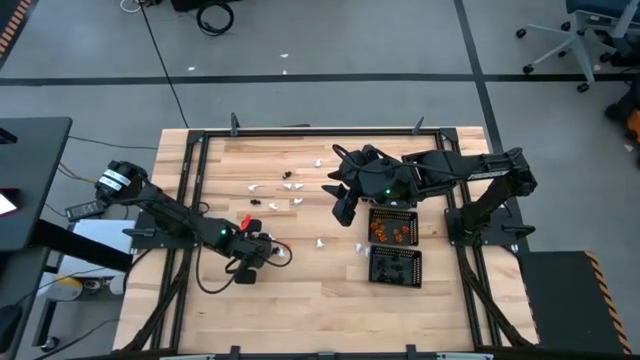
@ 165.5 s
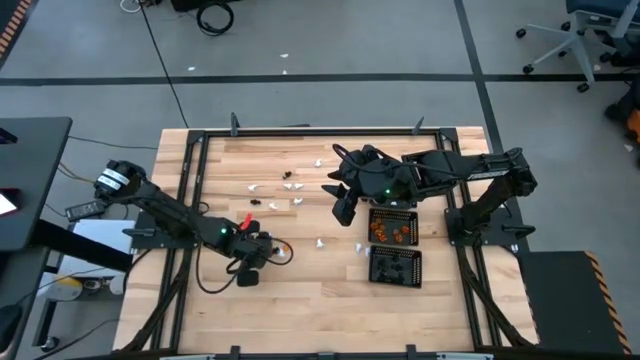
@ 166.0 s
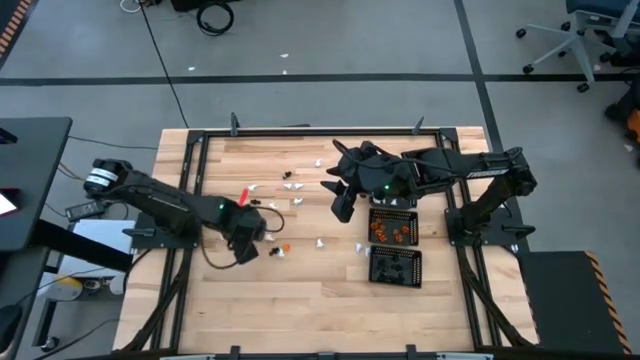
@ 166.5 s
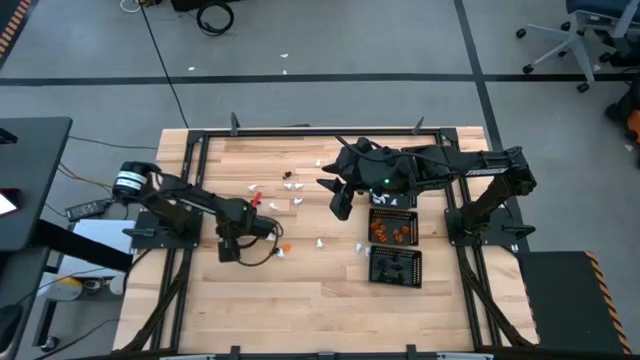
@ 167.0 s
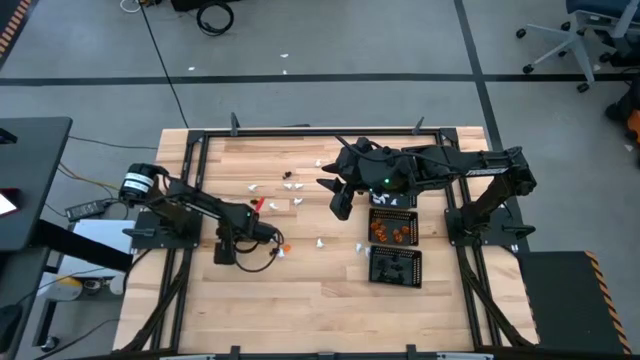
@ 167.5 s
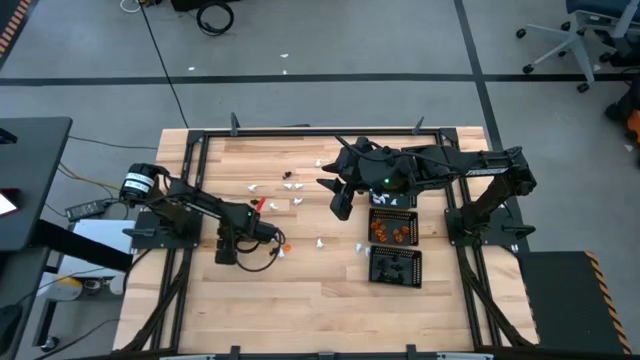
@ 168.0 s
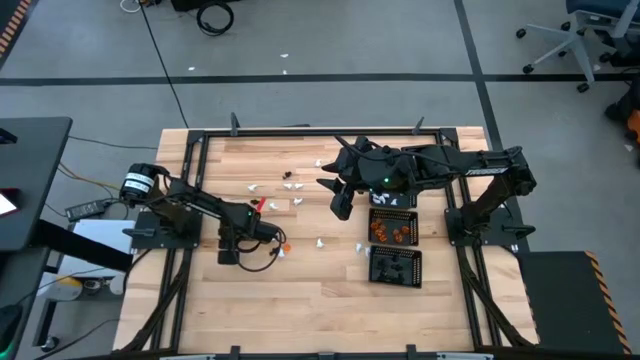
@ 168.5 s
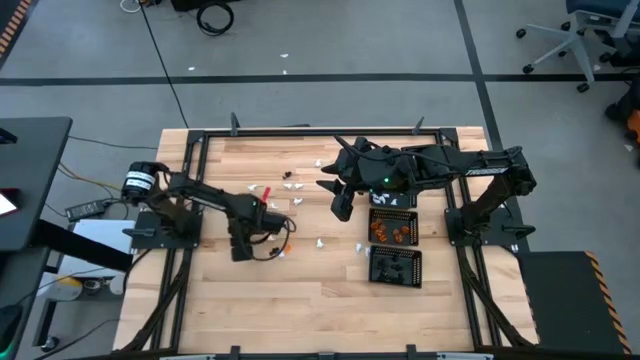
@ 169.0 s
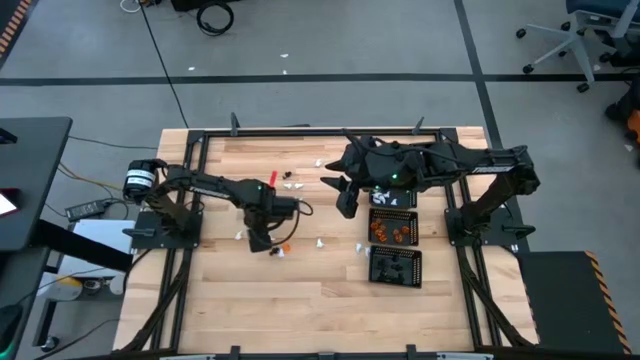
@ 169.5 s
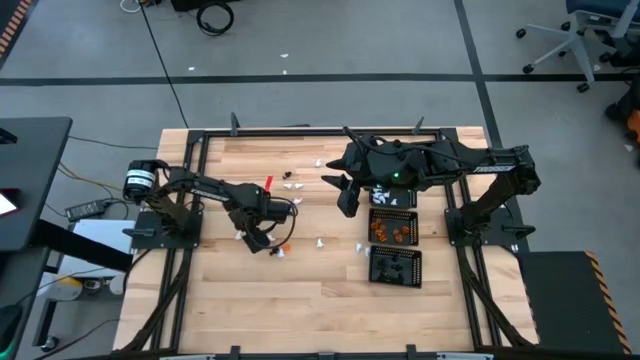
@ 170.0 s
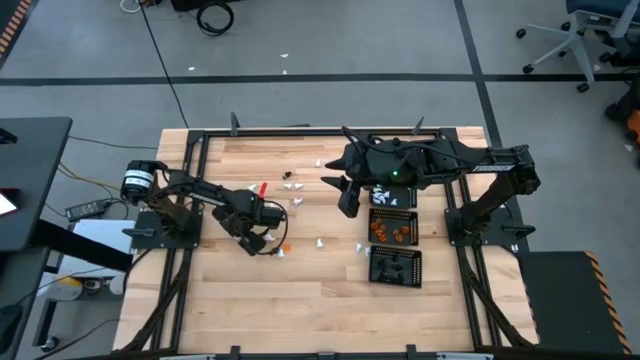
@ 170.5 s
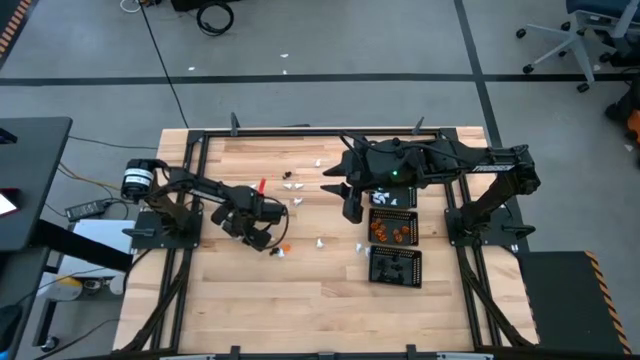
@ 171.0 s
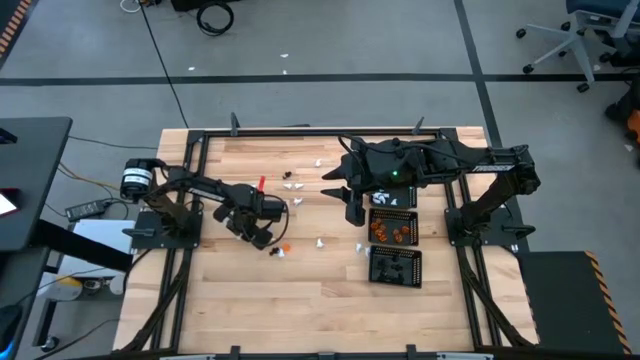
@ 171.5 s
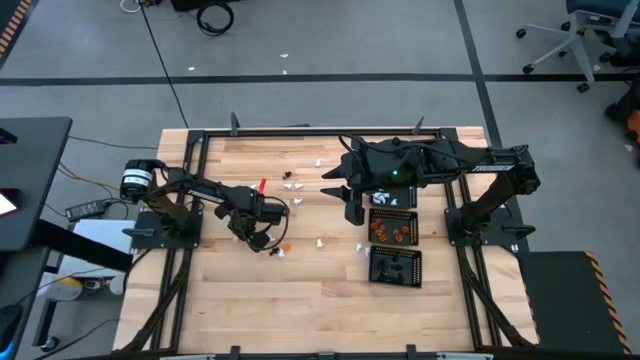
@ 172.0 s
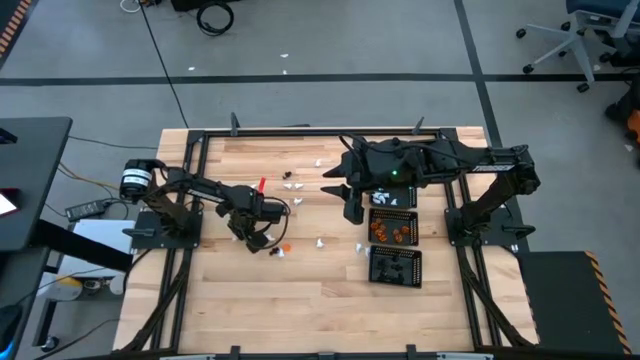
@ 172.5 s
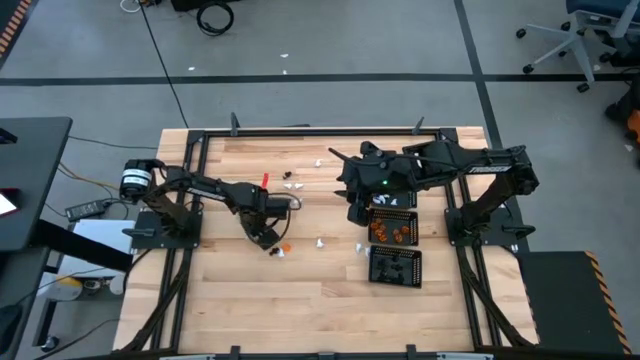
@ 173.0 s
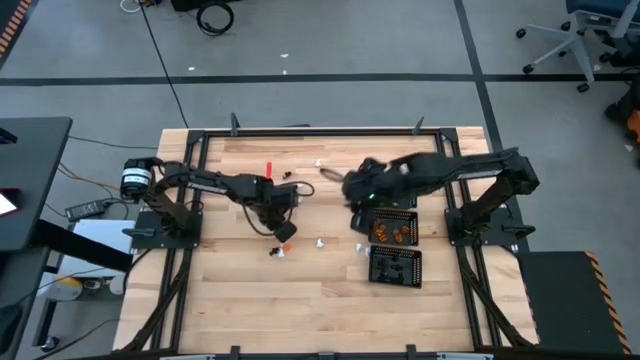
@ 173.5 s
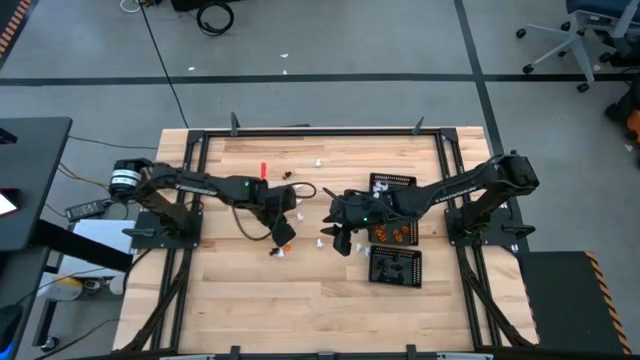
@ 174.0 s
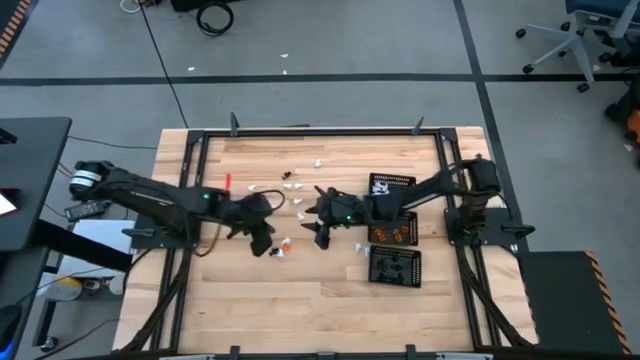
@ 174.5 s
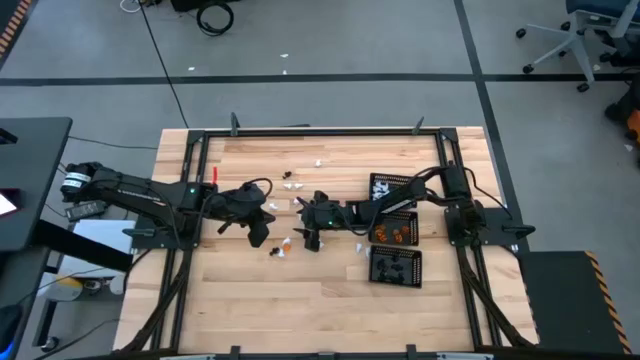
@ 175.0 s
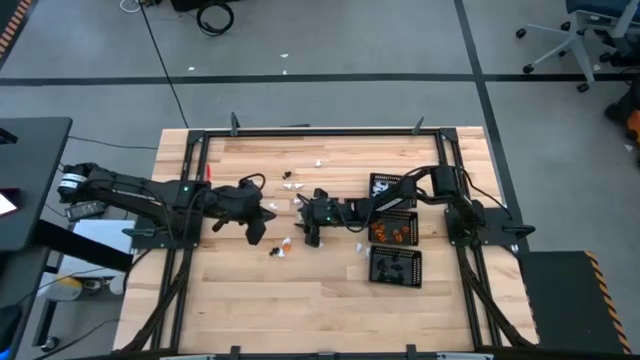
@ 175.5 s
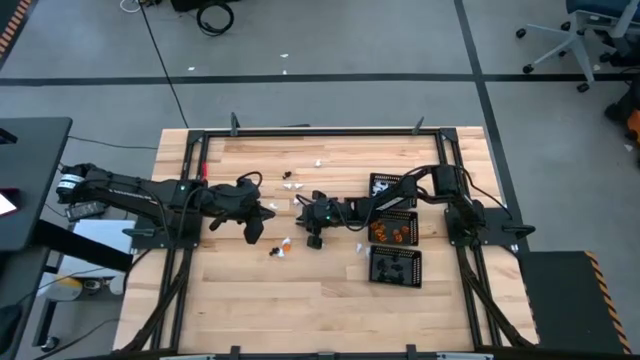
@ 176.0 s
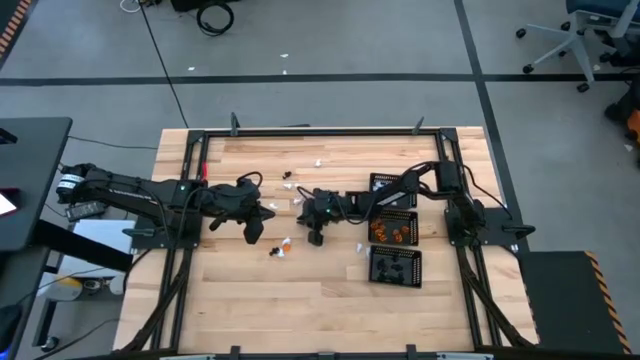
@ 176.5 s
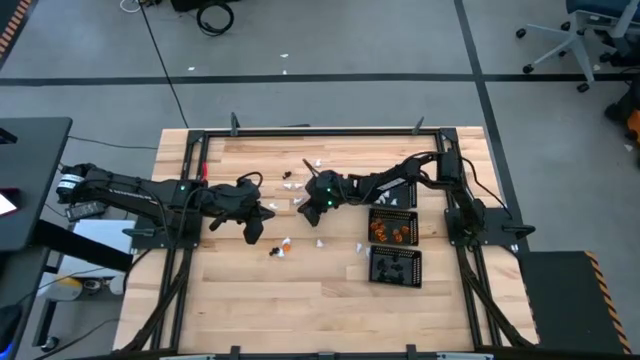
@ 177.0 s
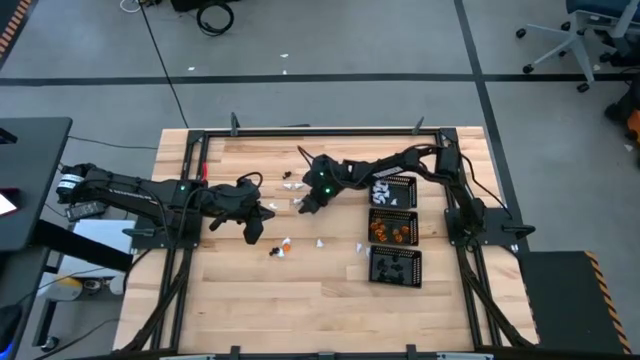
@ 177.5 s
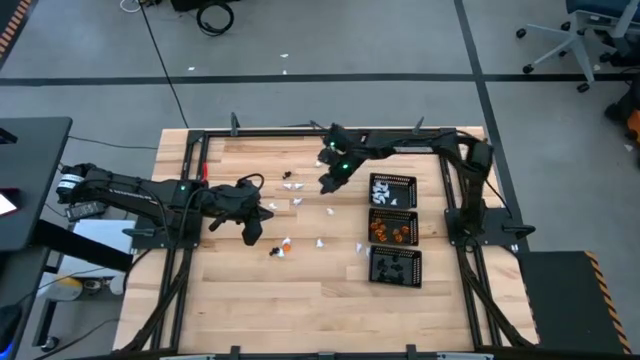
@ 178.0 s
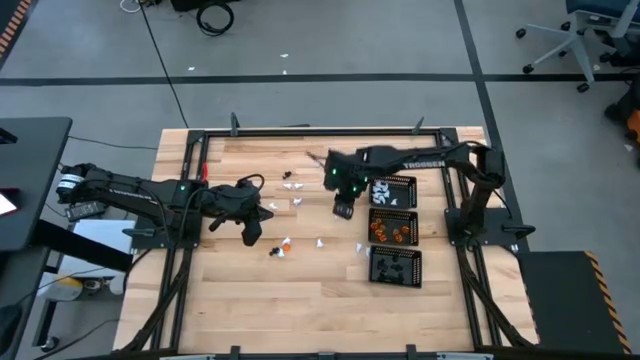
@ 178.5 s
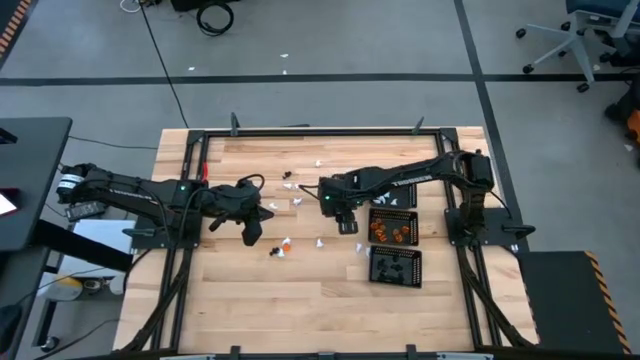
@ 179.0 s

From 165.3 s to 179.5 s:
Task: Sort Halloween decoration
Put the white ghost toy into the top black bin

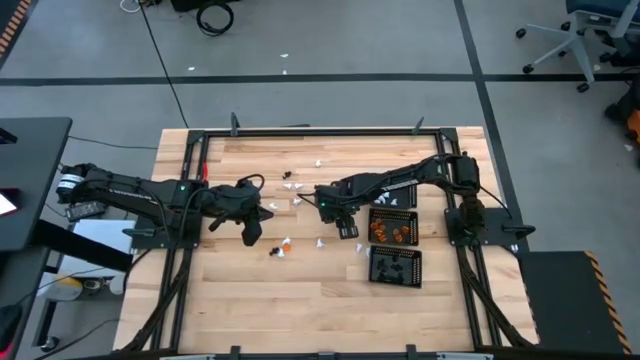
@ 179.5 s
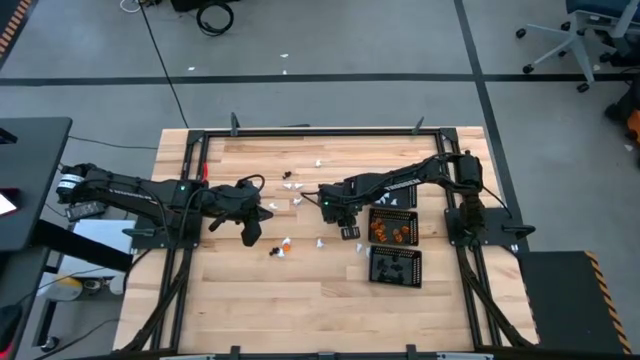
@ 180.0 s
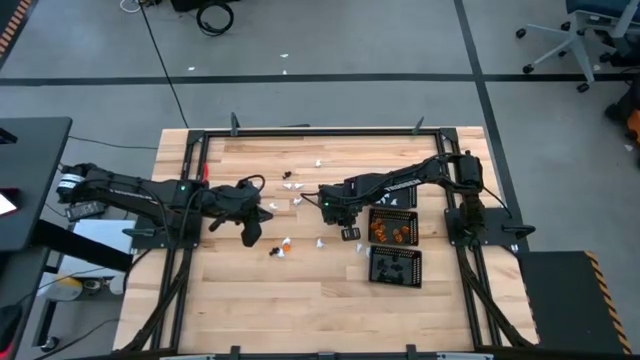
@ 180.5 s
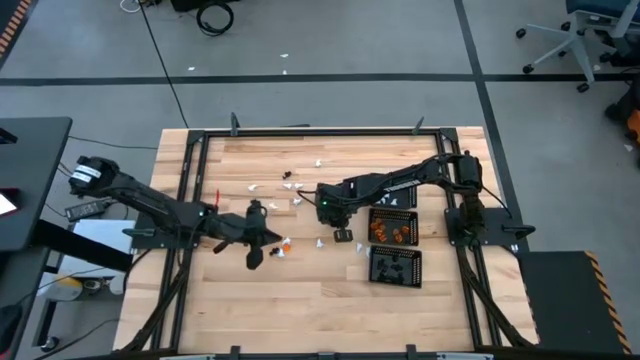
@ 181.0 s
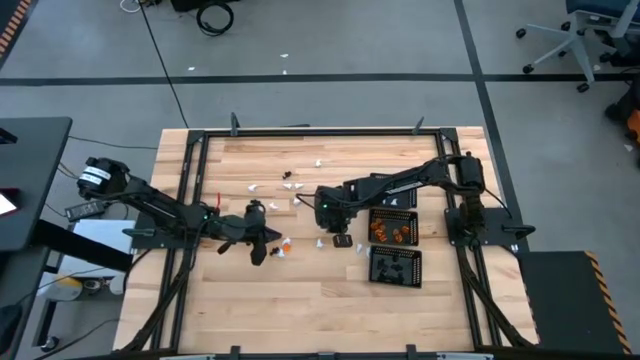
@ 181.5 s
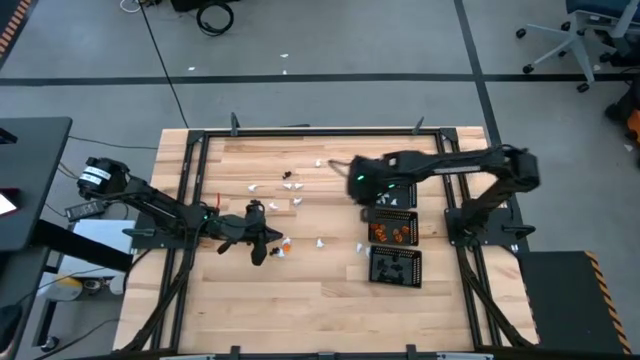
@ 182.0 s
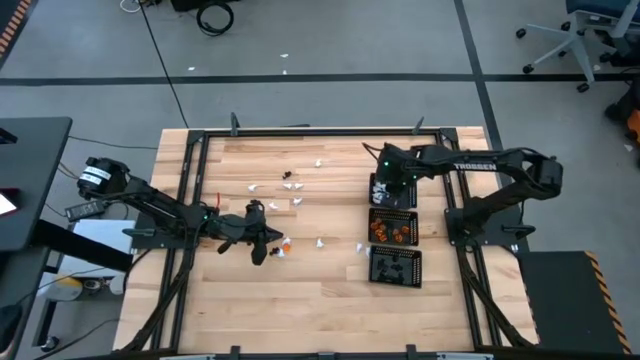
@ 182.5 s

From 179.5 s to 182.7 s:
Put the white ghost toy into the top black bin

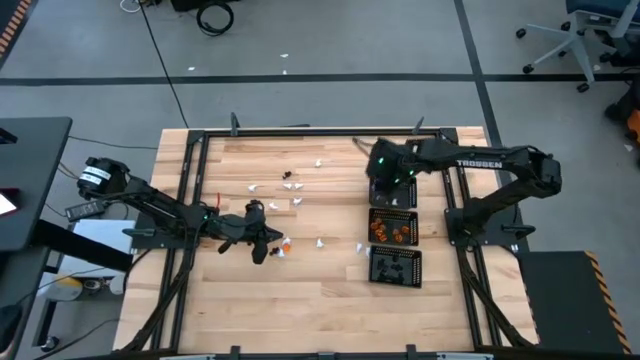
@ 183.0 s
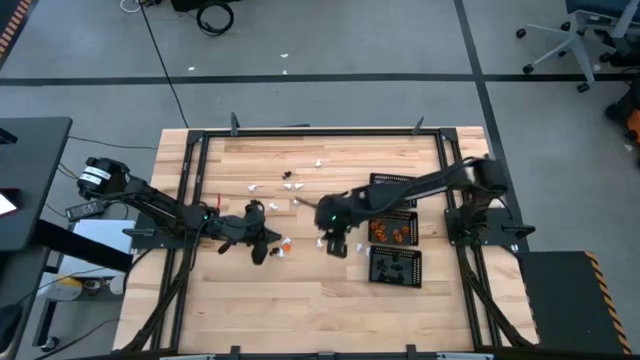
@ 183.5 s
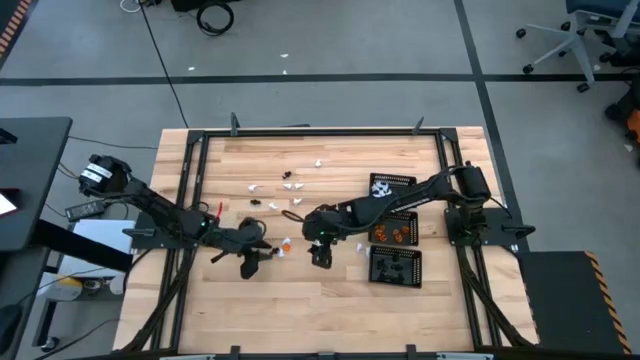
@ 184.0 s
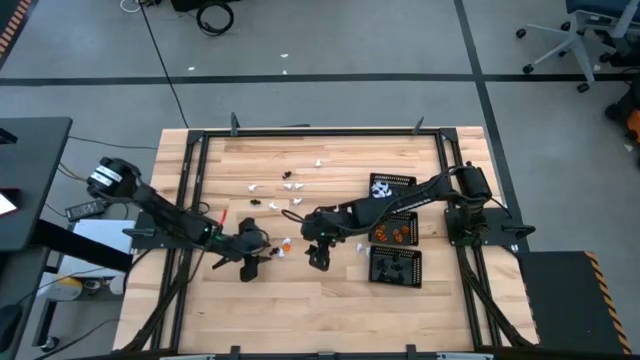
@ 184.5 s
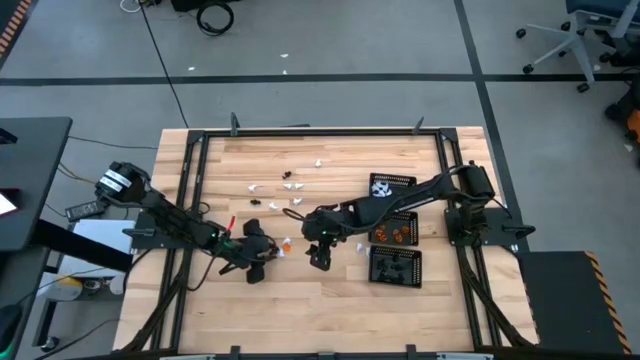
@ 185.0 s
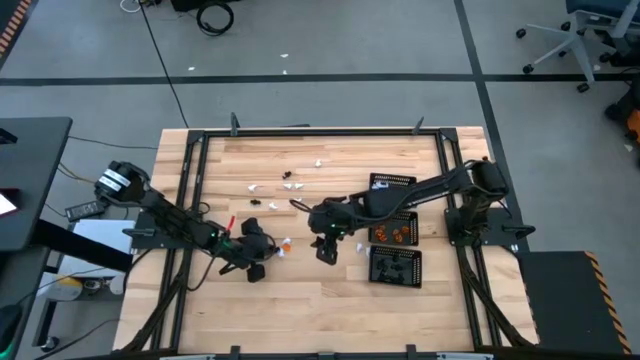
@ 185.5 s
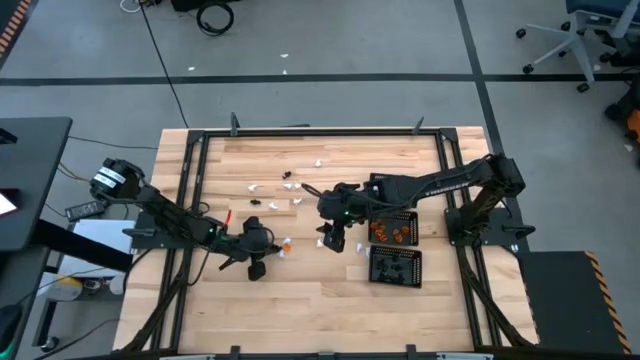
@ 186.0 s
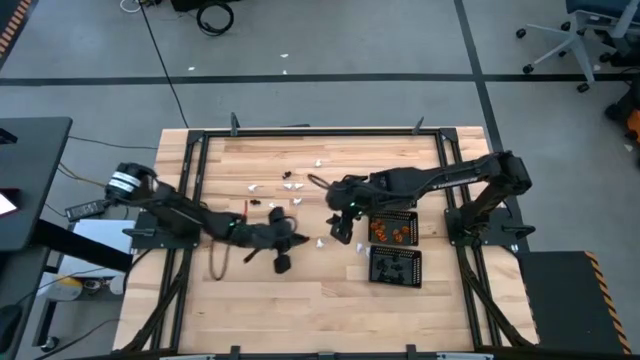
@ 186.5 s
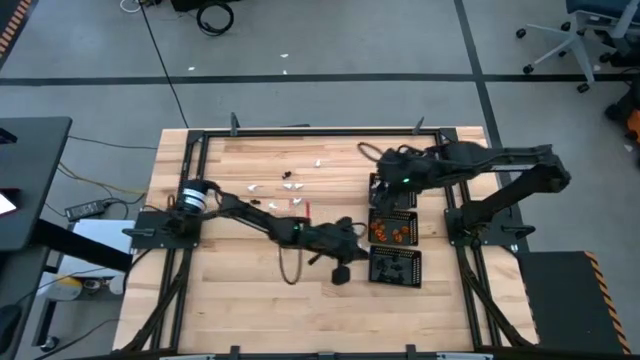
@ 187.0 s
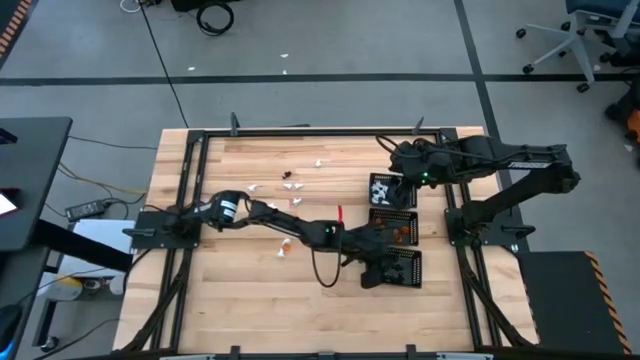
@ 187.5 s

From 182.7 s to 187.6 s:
Put the black ghost toy into the bottom black bin
